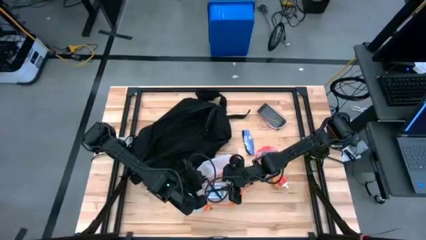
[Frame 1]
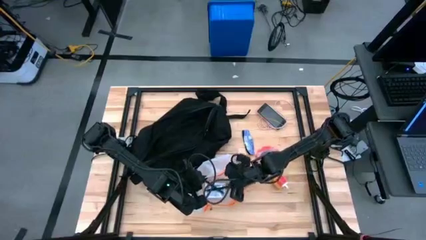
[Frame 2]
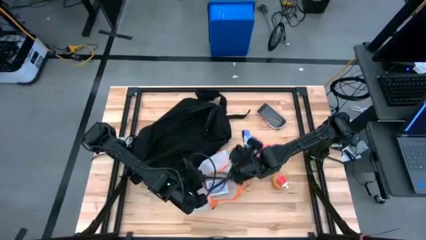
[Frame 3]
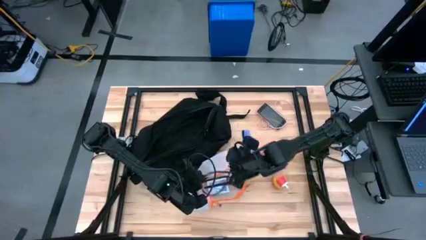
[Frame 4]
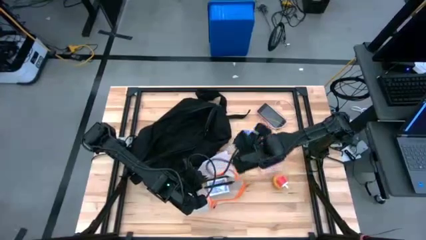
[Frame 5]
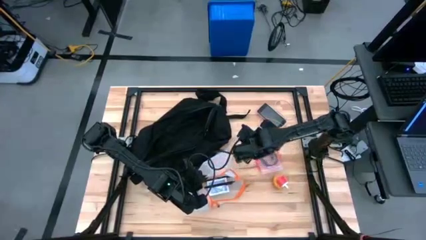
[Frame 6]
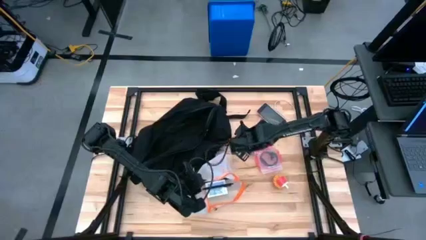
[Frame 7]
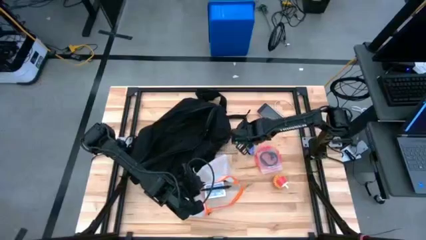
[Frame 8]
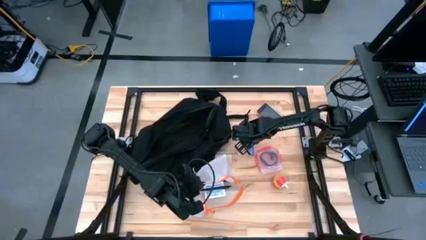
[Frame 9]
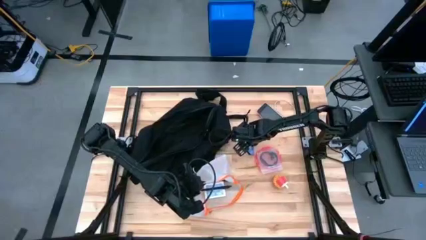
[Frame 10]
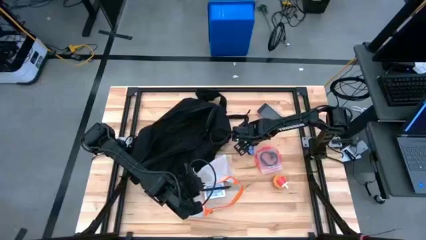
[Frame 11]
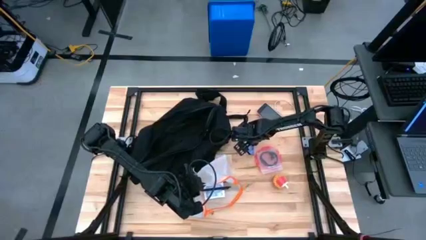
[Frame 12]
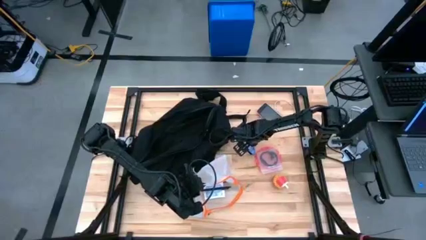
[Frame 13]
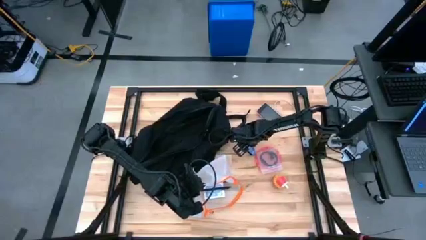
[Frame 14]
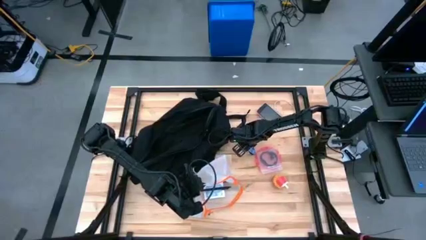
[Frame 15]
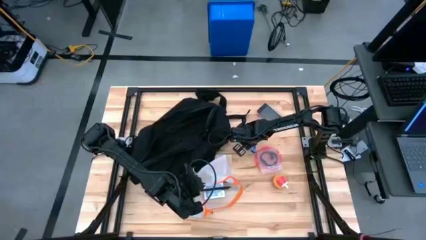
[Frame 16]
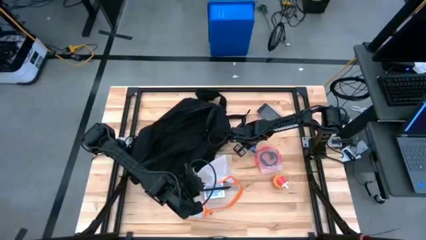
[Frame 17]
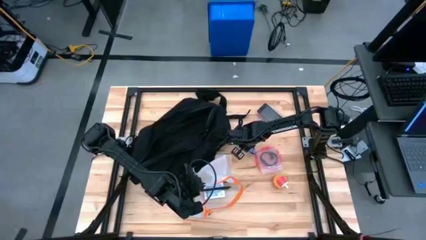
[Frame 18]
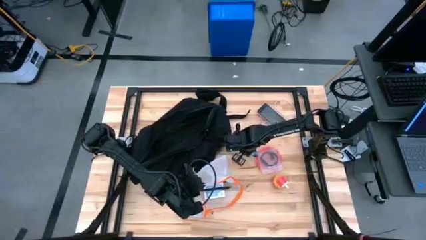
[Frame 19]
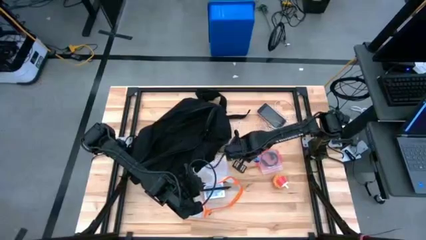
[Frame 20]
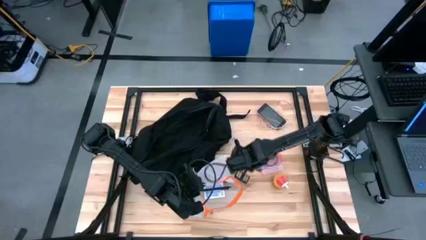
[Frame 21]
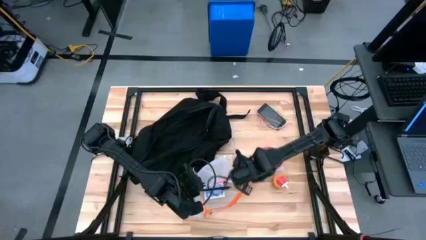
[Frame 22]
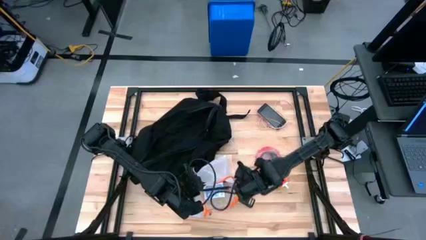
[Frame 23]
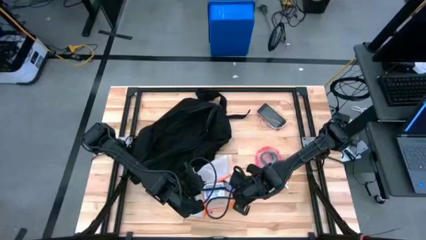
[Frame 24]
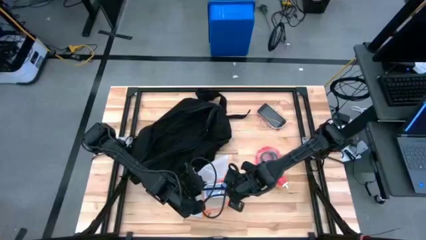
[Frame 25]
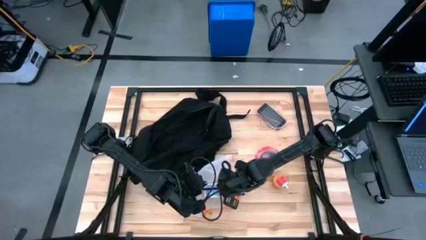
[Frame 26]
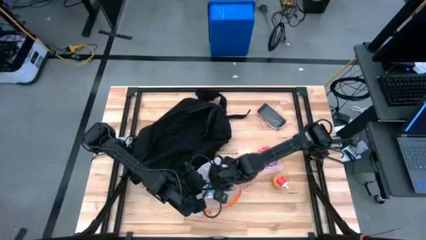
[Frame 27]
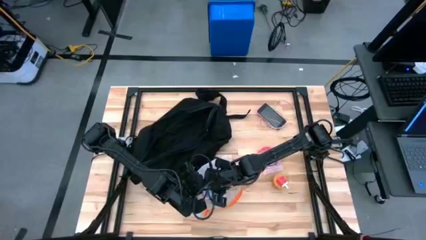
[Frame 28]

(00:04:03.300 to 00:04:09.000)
Task: Unpack backpack
Put the blue chocolate bar into the orange zip bag

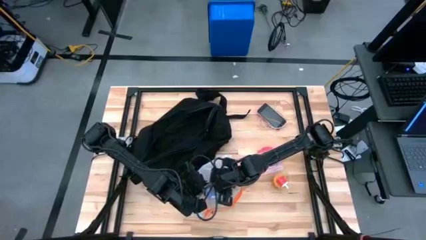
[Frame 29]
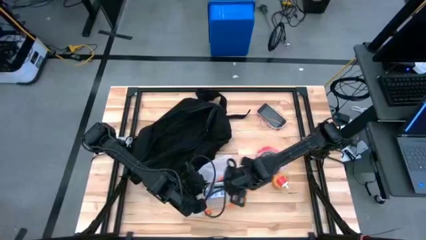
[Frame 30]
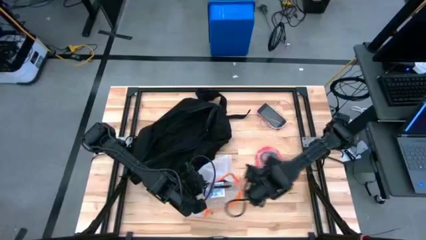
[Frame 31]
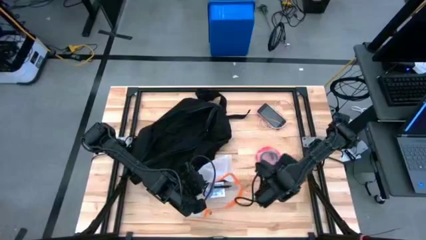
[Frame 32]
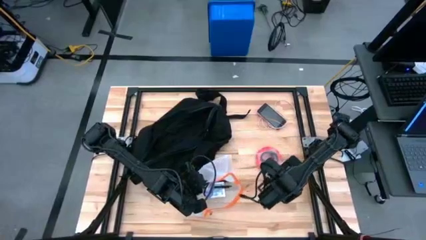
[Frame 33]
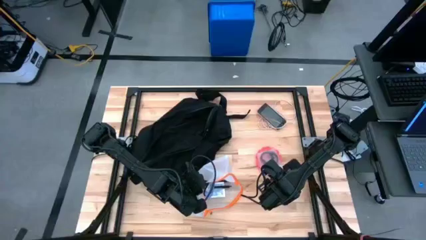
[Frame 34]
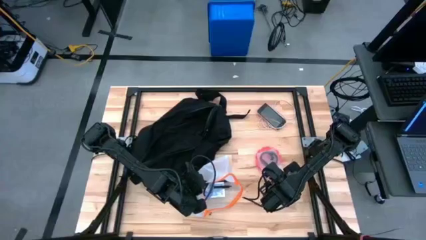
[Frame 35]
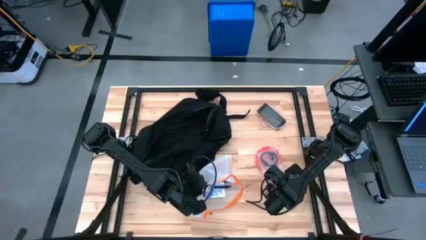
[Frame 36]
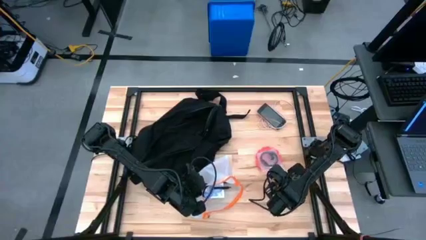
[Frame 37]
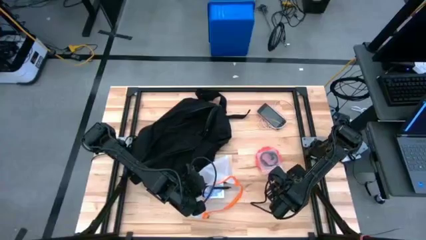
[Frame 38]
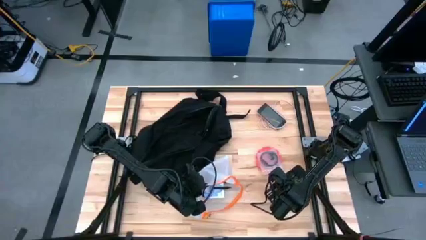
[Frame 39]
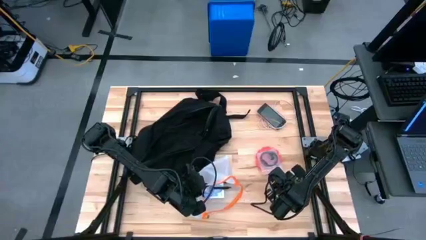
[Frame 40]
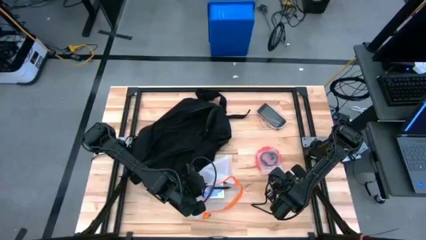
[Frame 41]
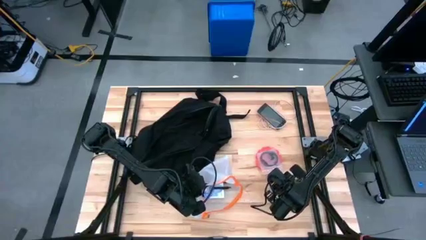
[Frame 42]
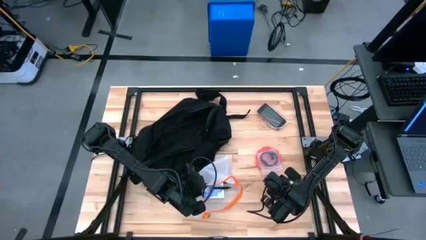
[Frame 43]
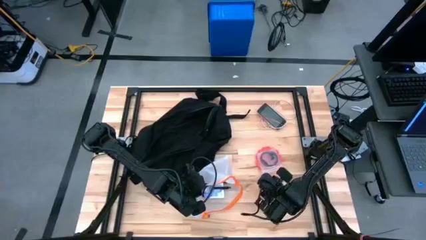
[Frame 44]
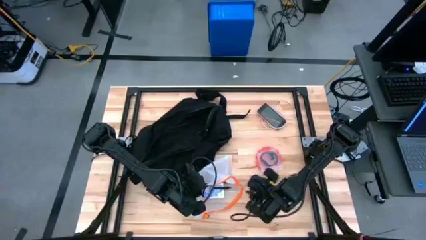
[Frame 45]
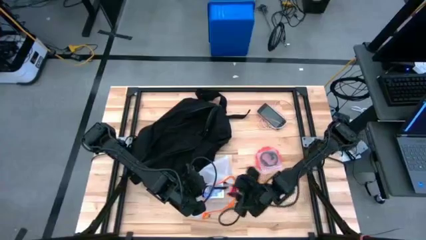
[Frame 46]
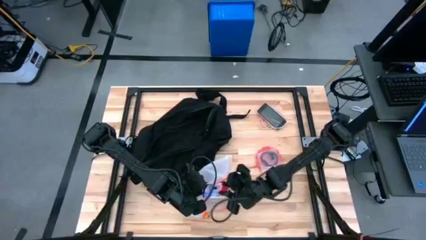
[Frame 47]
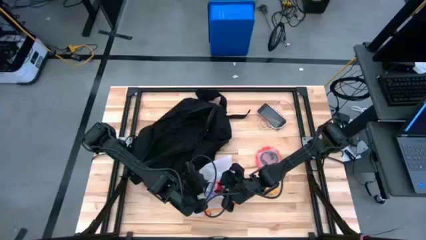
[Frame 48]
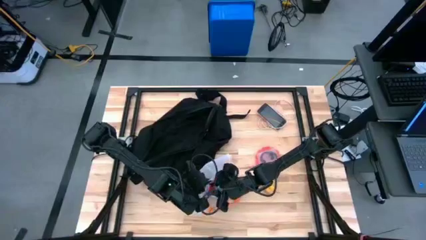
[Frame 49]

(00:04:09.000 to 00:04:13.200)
Put the pink charger adapter into the orange zip bag

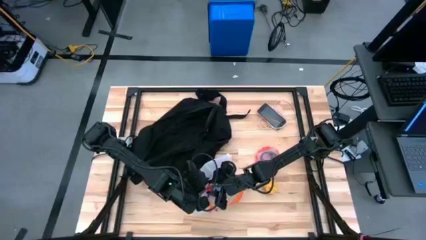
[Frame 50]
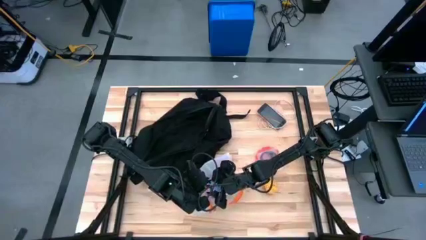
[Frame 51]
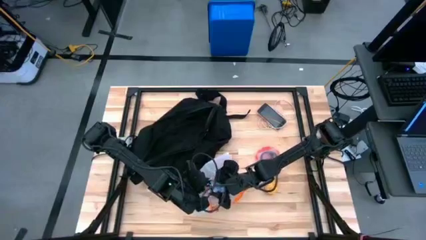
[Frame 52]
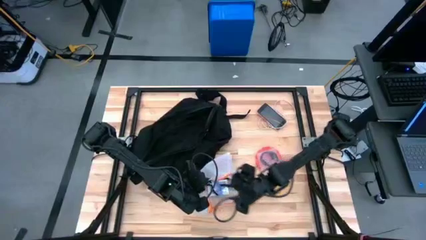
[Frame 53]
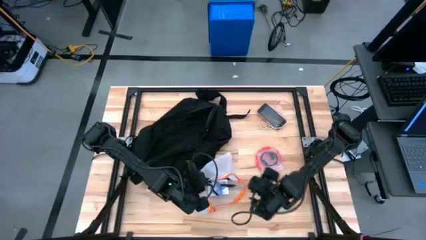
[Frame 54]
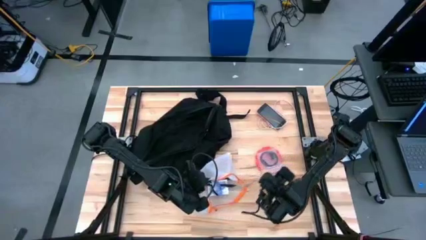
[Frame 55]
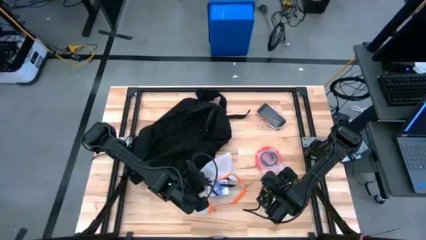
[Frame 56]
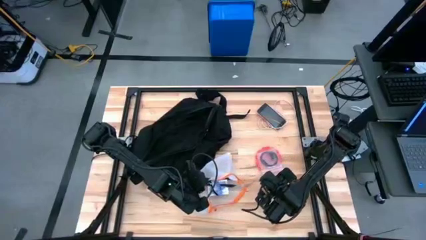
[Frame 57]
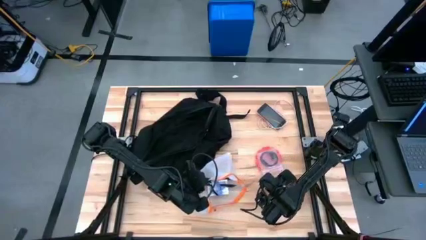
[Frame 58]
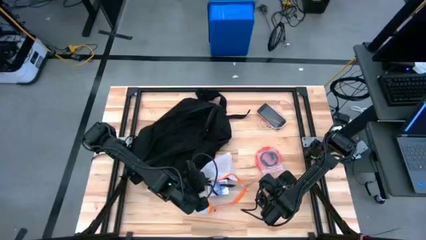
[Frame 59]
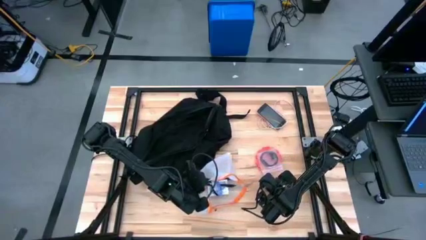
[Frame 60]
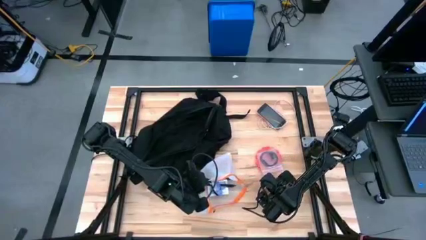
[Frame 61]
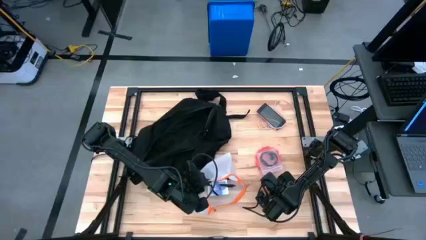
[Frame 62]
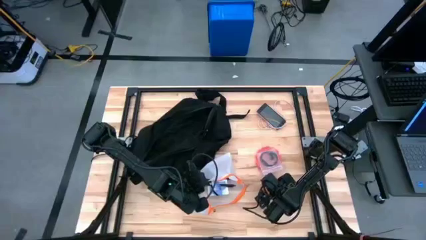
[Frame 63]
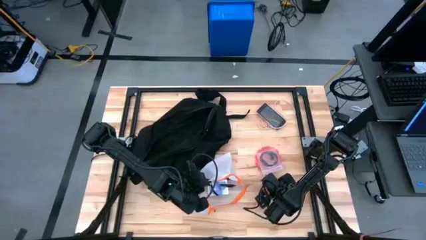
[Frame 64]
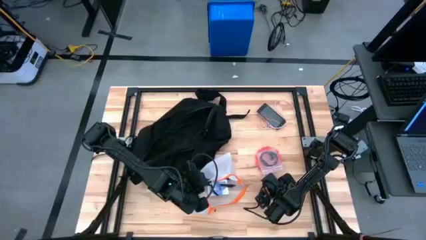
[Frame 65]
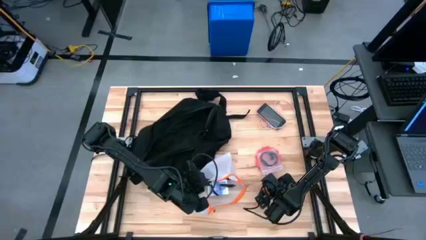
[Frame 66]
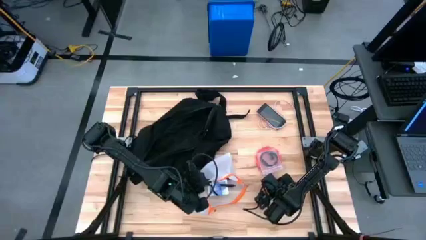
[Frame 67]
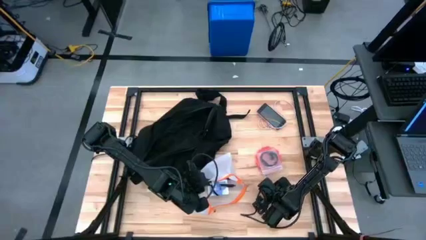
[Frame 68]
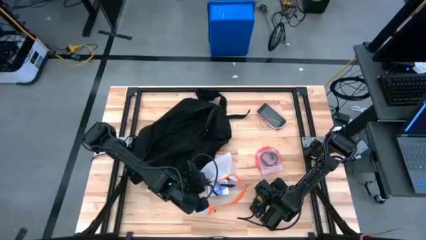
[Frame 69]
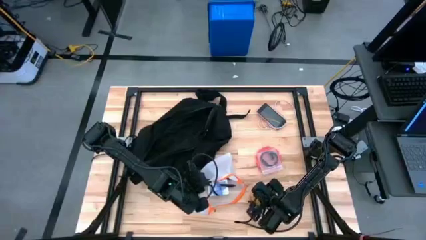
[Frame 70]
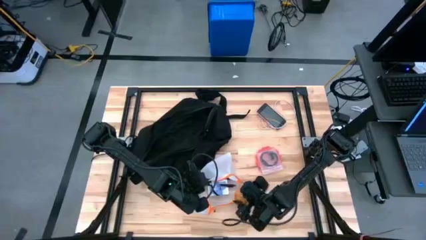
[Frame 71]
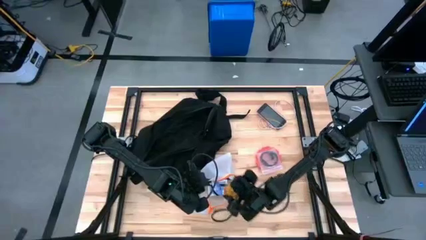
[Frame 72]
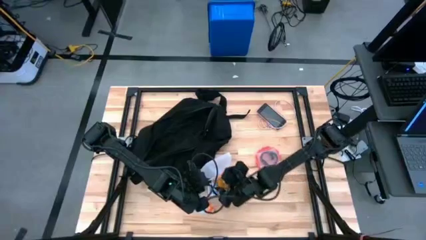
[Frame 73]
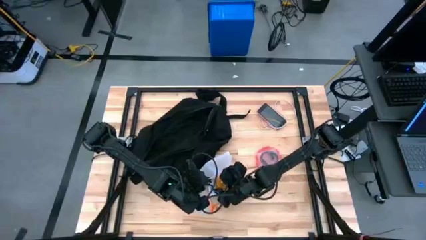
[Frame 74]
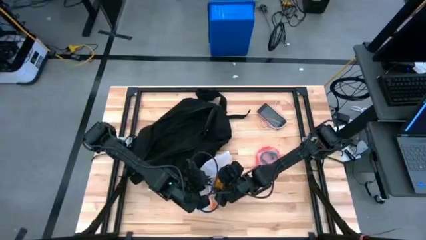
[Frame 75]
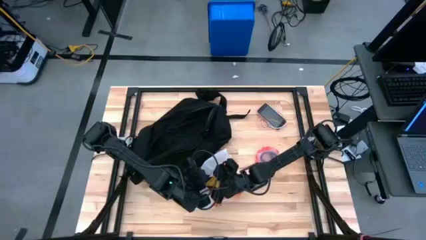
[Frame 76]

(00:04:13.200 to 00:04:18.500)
Put the yellow scented candle into the orange zip bag

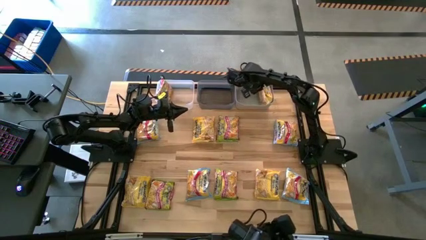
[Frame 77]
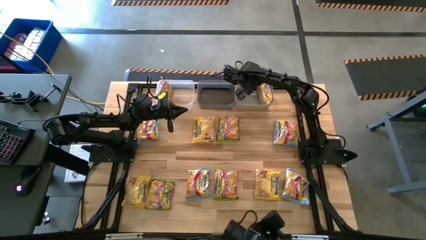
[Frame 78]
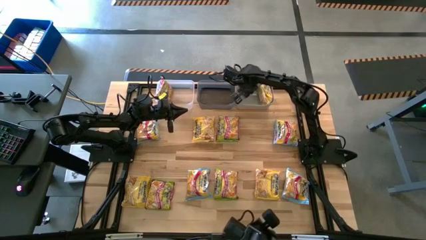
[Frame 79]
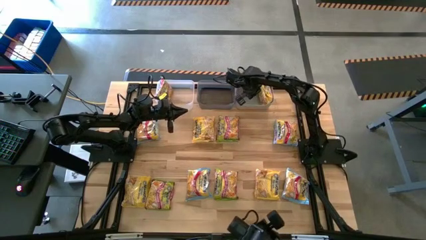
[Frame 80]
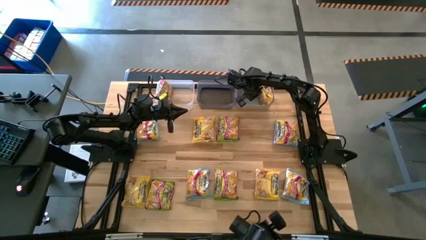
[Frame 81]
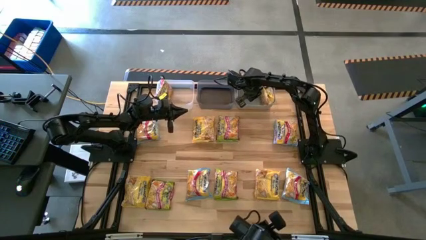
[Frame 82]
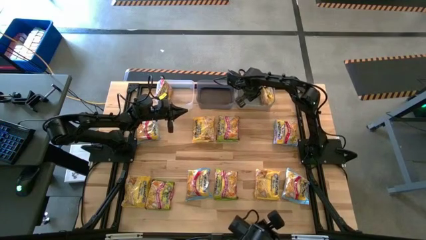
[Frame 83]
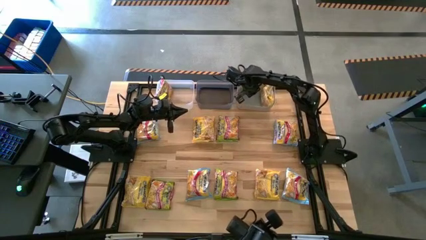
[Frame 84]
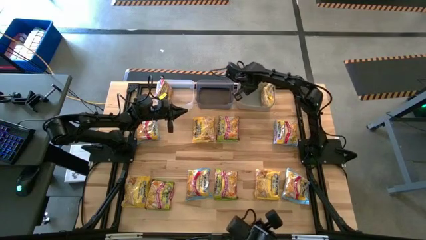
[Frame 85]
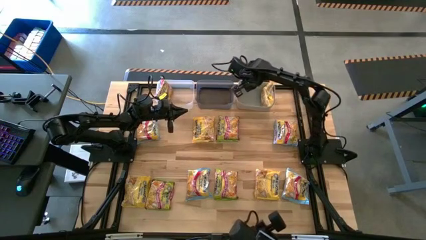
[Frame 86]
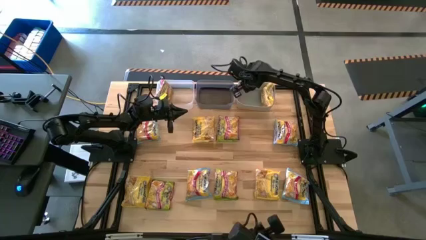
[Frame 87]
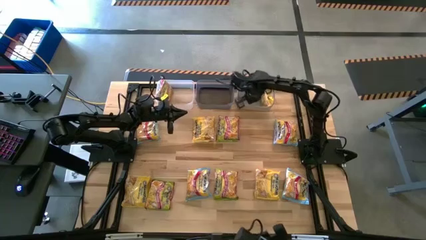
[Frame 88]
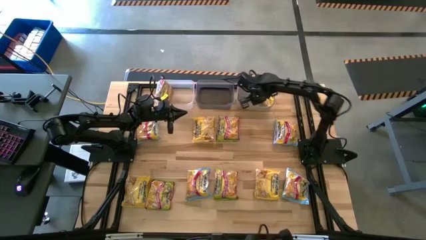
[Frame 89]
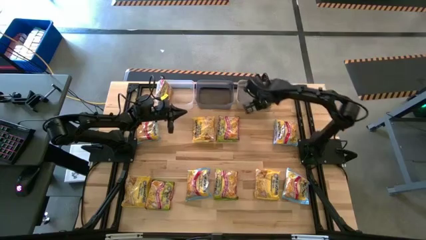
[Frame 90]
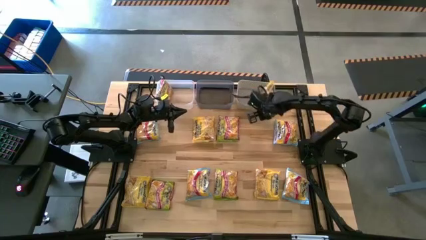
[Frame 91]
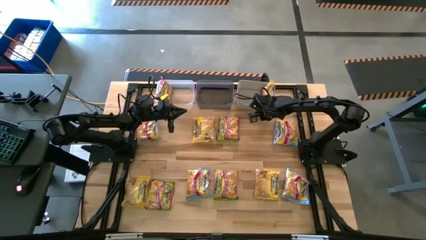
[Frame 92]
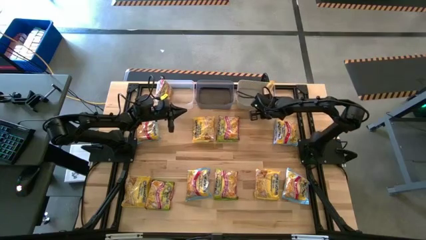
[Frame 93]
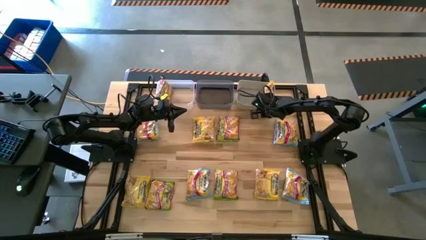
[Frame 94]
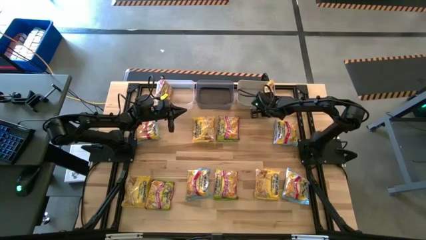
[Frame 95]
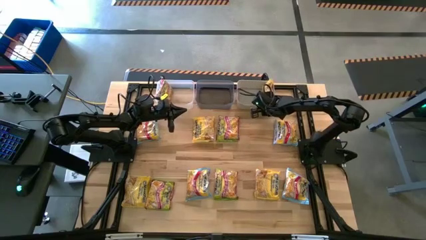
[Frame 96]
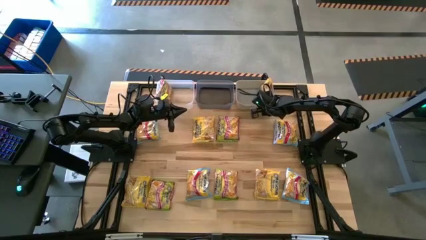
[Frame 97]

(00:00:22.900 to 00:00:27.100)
Task: Sort Maruchan noodles
Adjust the gray bin
